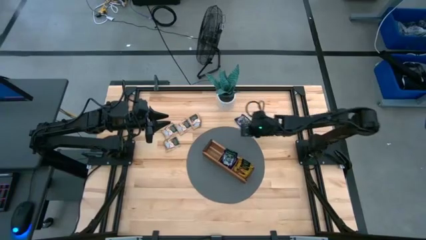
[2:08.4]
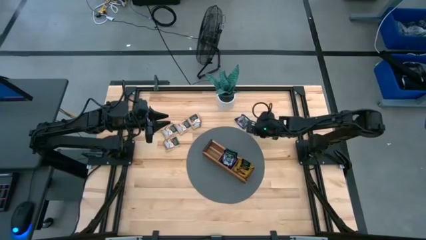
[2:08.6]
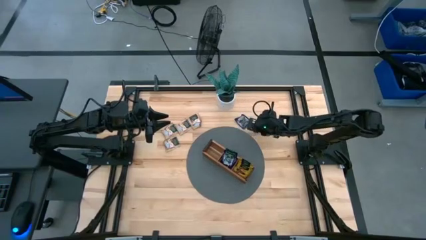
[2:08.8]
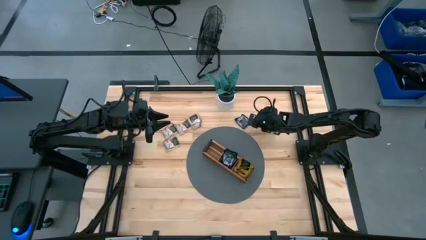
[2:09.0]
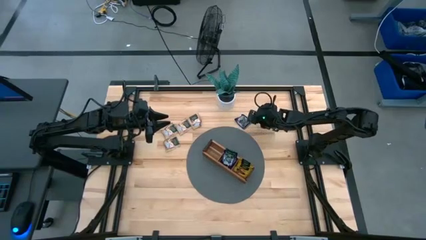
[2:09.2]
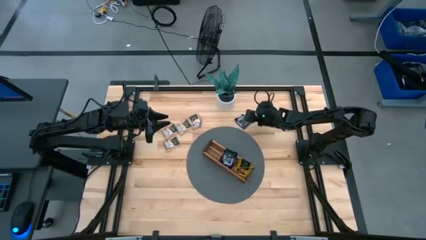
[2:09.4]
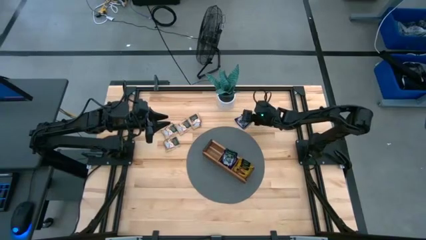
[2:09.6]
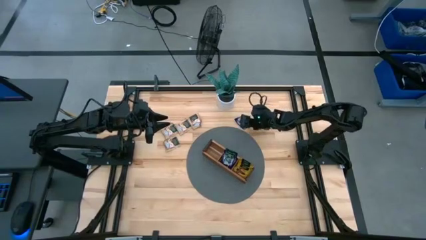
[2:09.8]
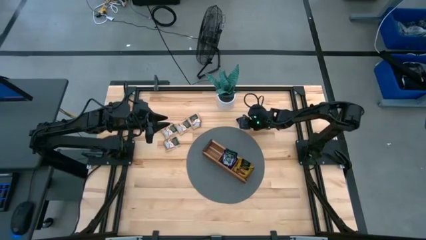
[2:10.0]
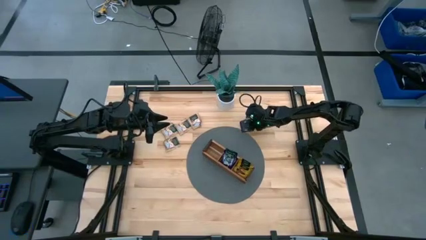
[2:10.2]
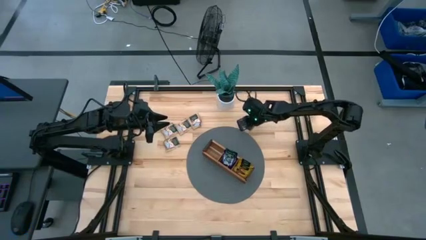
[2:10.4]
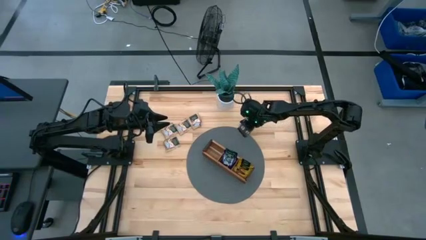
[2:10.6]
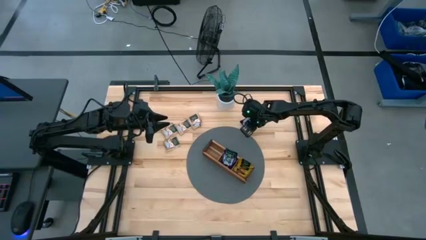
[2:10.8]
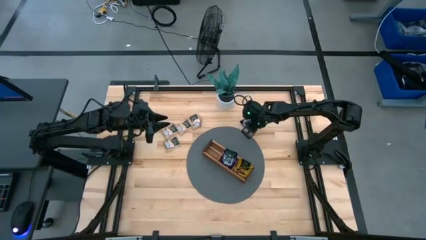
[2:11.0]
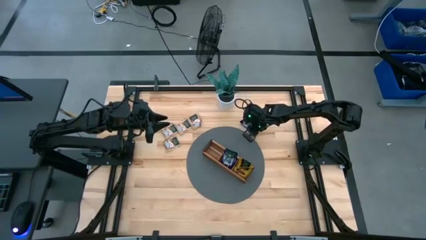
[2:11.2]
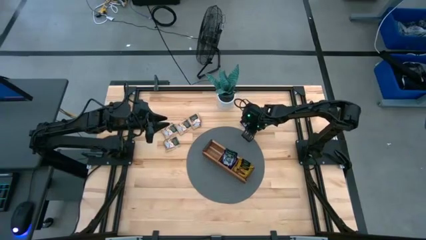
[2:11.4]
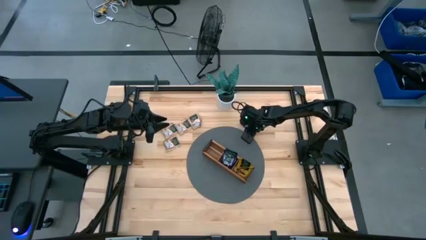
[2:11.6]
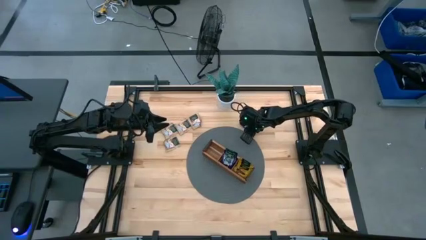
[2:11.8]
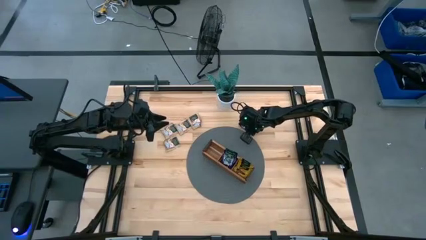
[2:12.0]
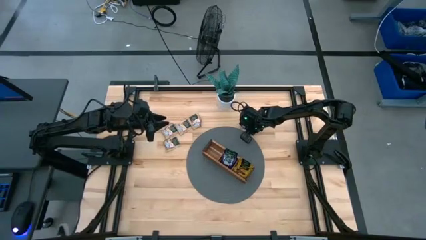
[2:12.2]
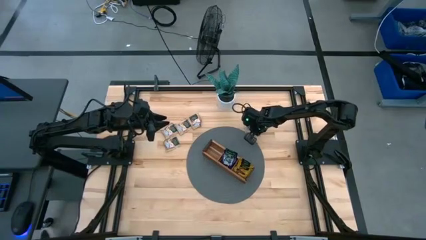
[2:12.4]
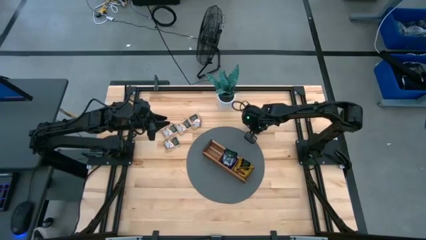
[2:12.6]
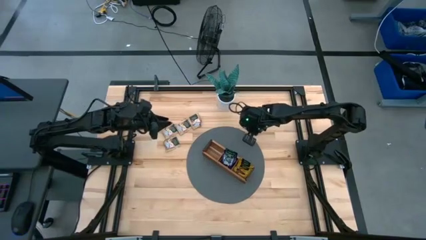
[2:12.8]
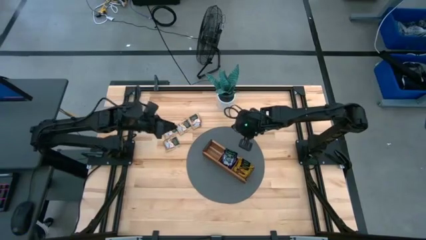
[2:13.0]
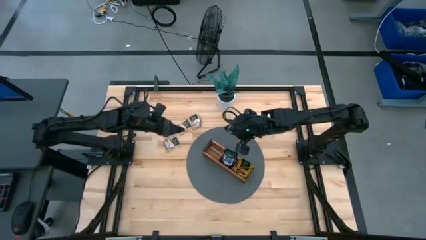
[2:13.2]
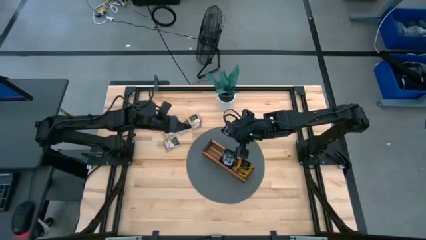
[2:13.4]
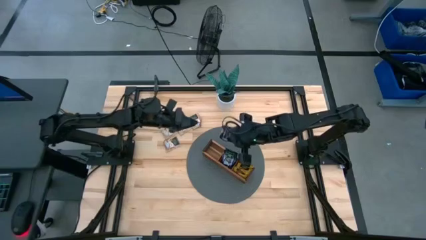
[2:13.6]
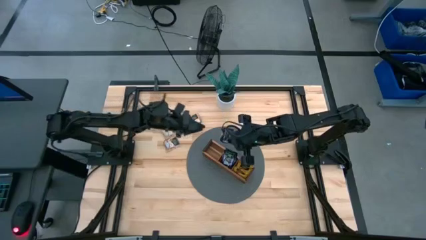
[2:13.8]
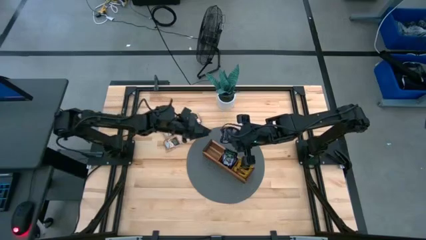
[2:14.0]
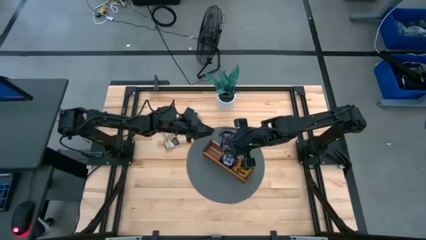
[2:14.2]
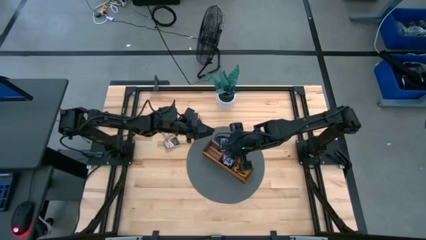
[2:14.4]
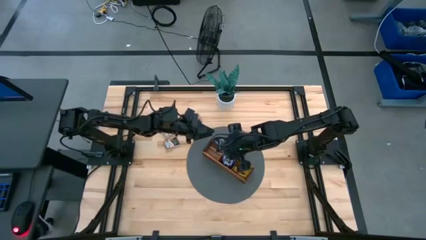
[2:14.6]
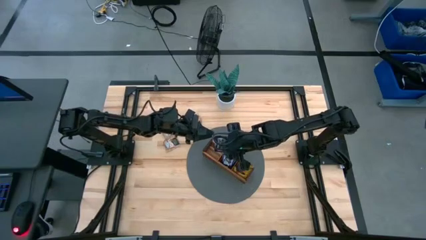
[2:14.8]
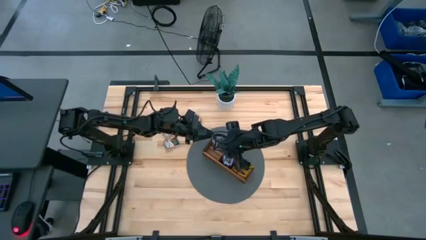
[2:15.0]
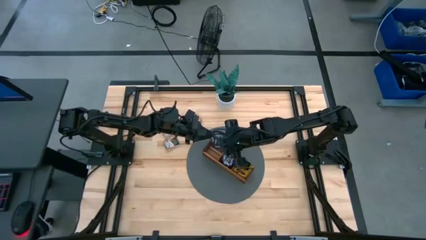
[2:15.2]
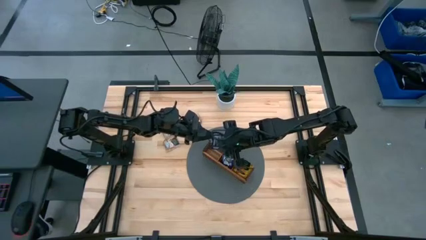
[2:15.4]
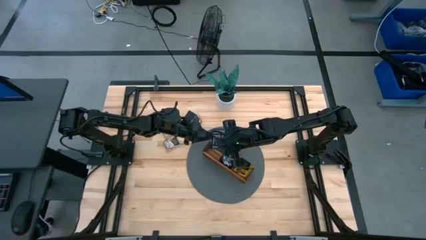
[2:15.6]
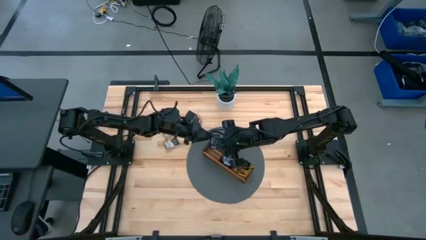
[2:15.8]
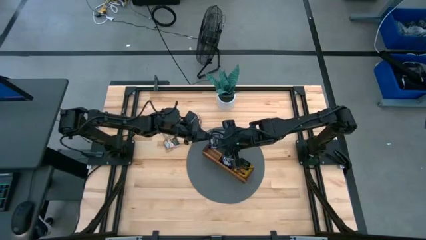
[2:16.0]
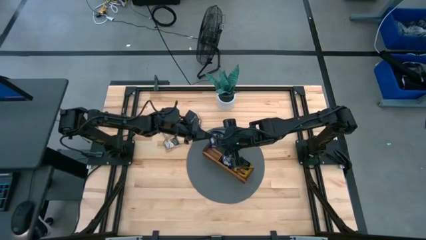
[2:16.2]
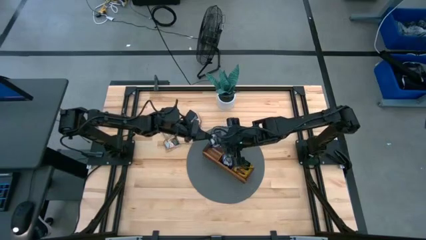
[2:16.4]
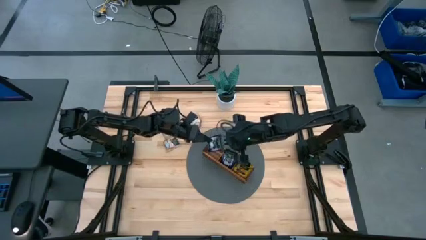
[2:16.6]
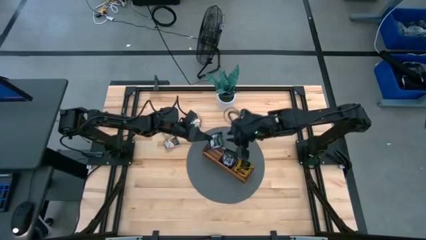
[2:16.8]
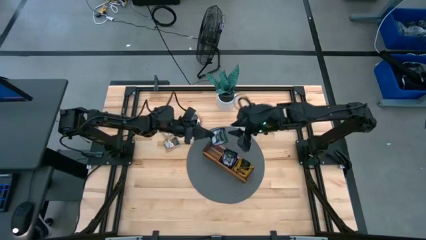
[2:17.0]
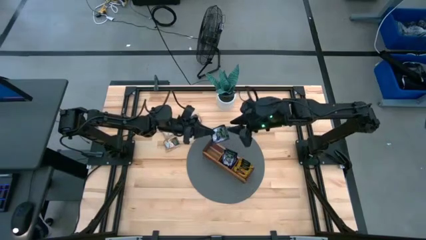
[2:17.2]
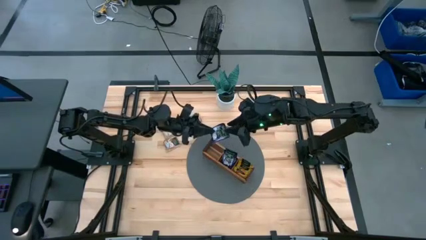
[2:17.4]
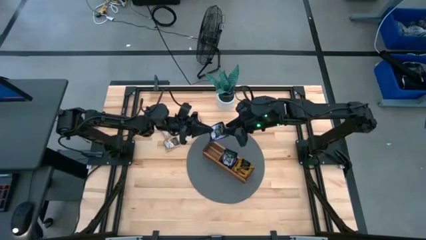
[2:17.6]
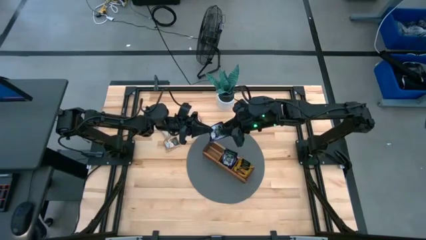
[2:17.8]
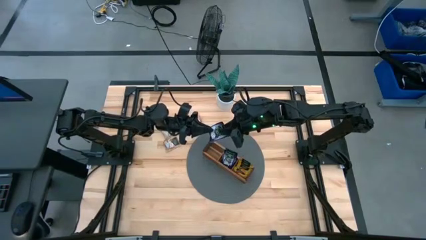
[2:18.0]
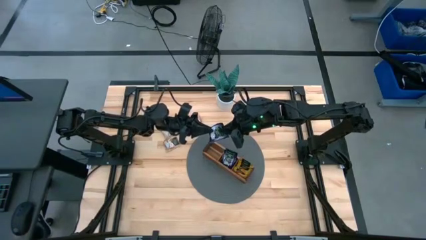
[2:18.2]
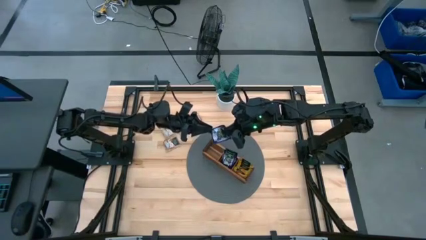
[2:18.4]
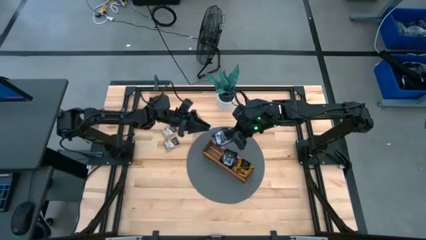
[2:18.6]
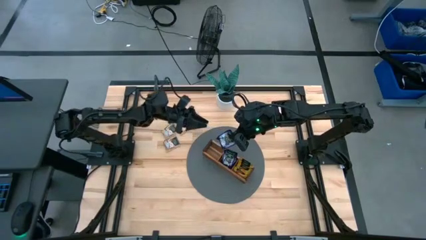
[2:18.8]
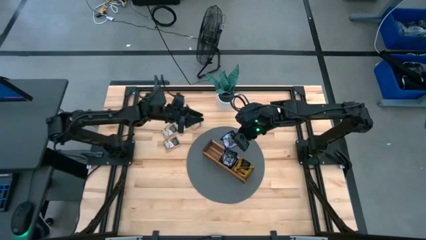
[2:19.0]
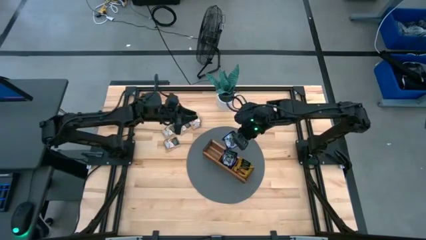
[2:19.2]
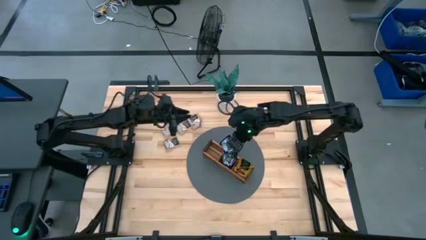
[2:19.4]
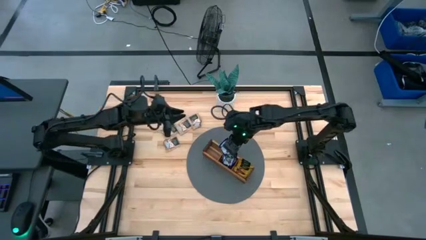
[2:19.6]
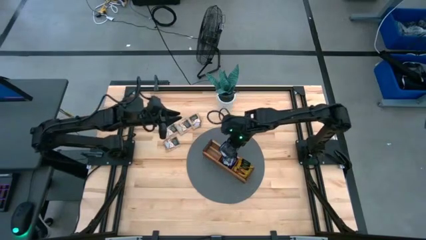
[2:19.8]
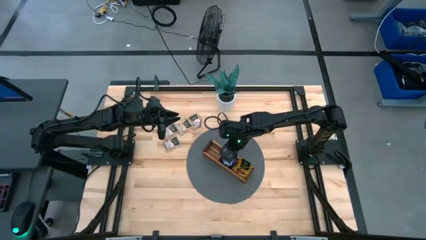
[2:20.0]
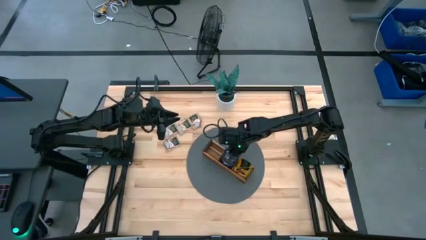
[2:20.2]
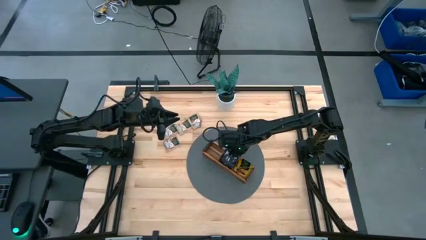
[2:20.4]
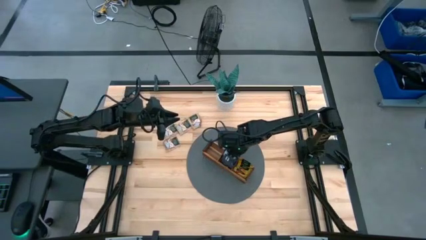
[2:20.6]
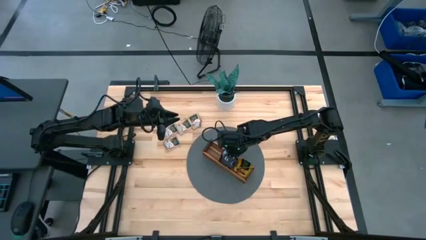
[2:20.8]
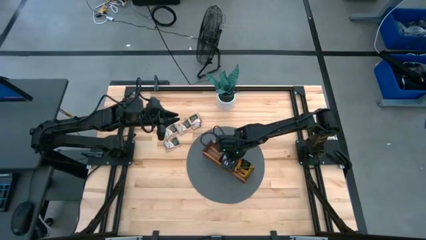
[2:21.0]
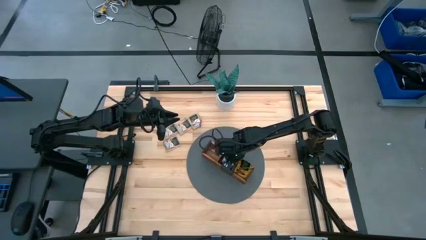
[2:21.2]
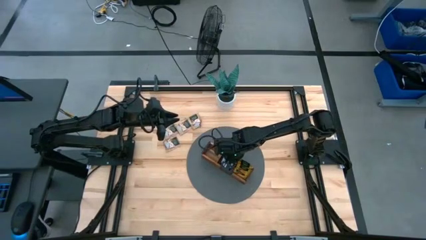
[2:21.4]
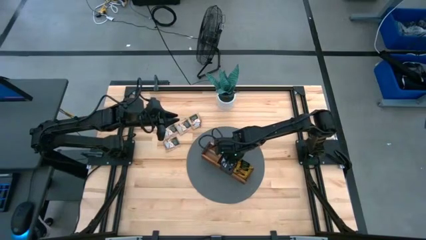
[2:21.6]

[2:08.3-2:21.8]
Task: Pick & Place Tea
Put the violet tea bag into the middle section of the wooden organizer

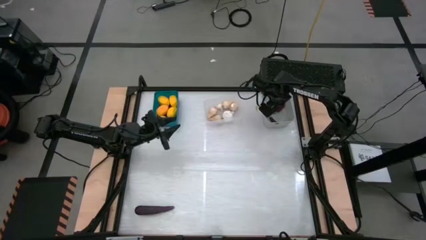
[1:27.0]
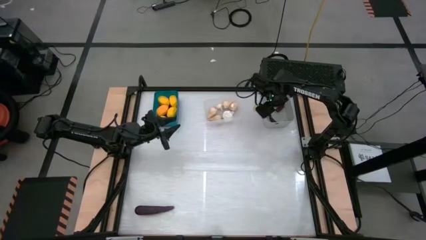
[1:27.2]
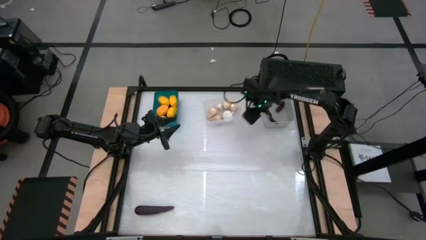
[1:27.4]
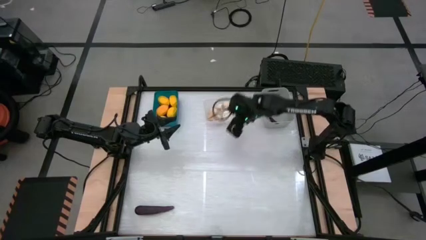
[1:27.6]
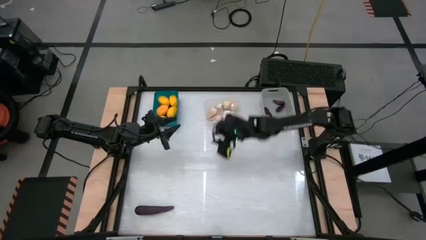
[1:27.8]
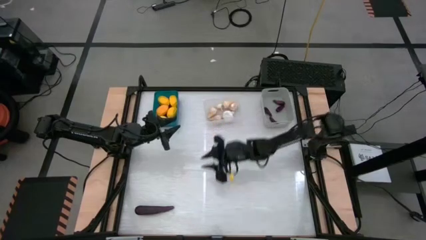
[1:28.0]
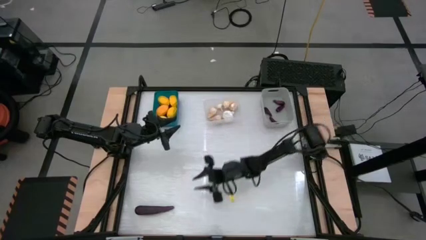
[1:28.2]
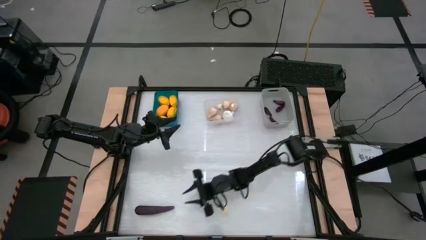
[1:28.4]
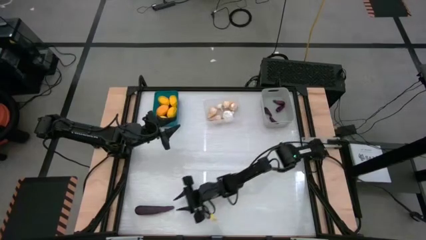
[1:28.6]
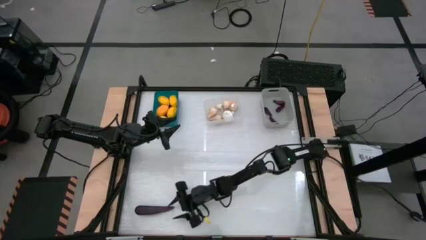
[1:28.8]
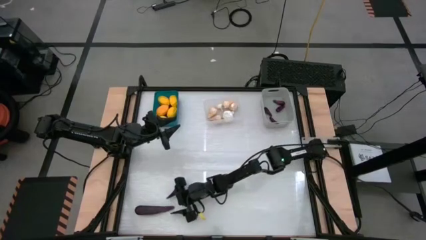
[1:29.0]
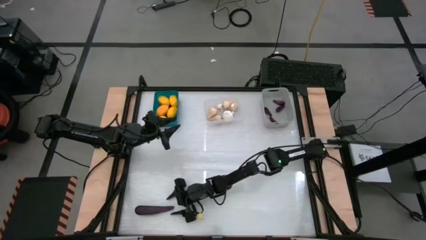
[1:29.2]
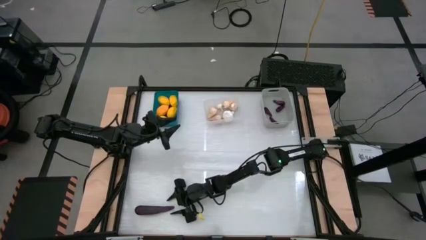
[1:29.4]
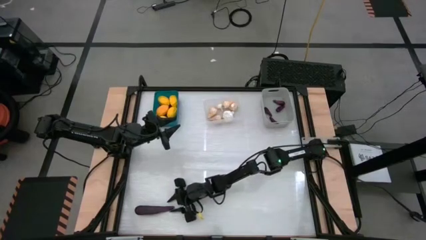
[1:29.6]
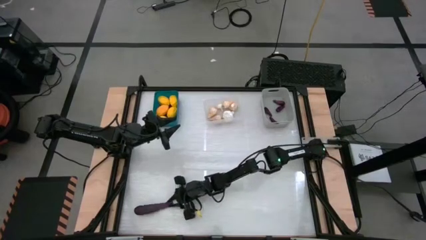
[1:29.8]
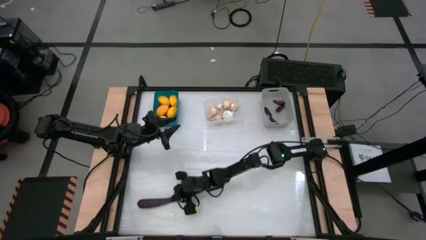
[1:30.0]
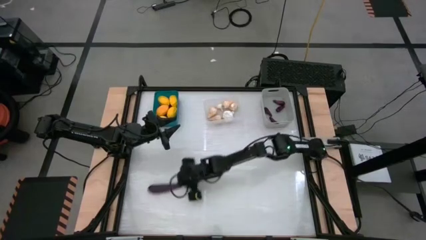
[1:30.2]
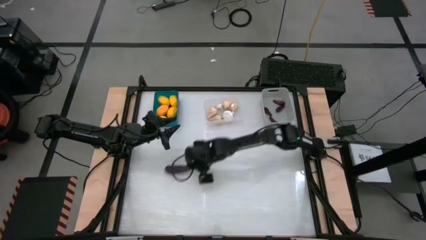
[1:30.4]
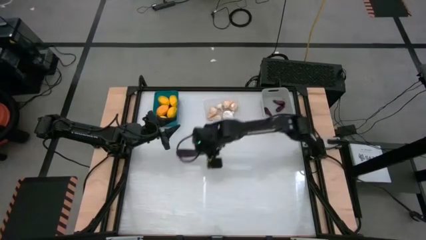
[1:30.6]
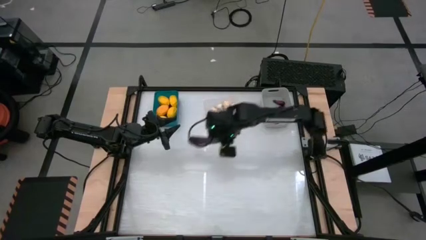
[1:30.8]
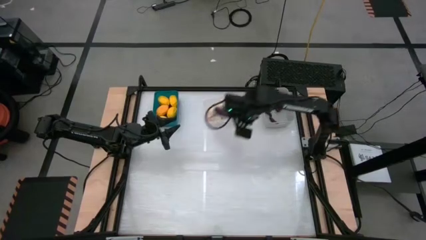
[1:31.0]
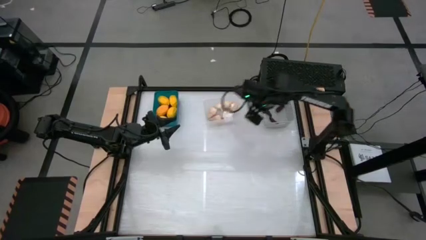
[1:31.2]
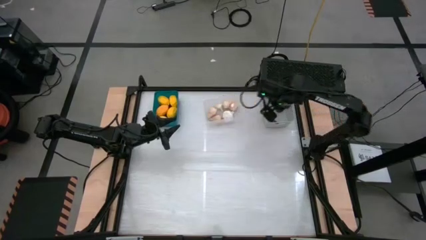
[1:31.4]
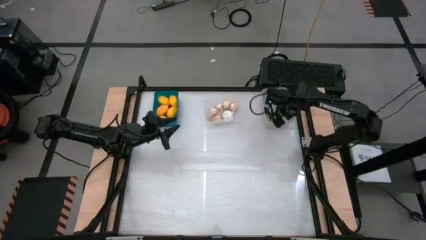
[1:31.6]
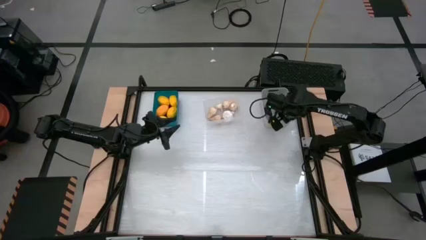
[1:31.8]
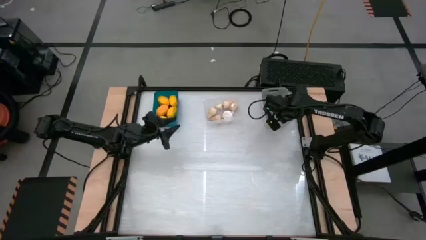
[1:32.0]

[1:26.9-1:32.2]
Task: Sort produce into baskets
Put the eggplant into the gray bin
